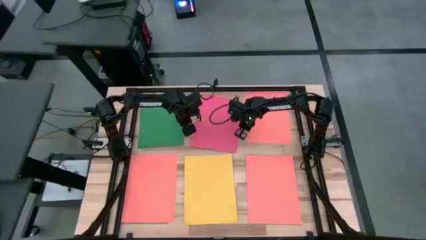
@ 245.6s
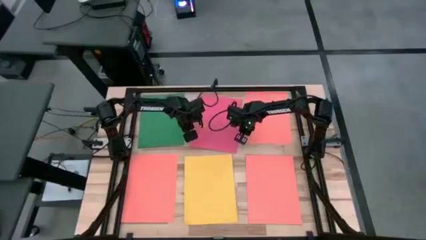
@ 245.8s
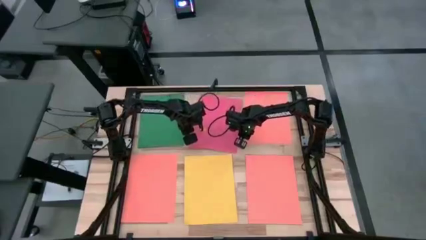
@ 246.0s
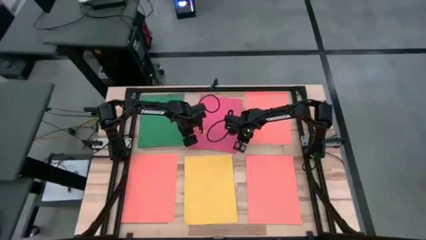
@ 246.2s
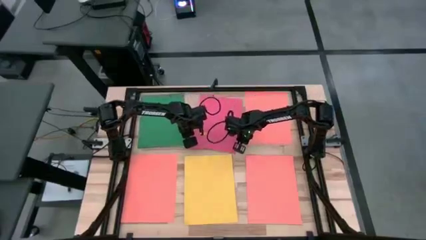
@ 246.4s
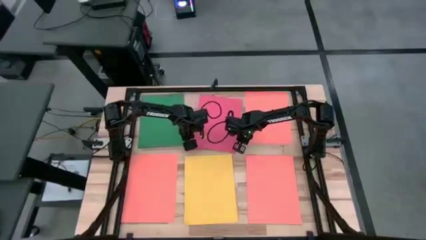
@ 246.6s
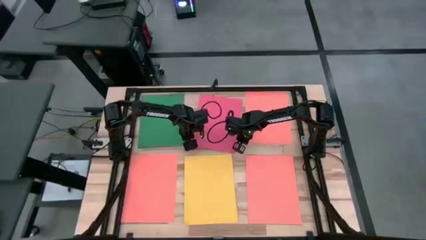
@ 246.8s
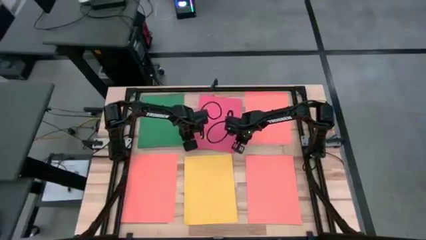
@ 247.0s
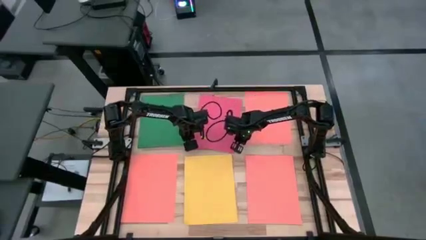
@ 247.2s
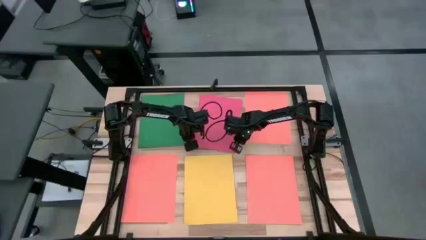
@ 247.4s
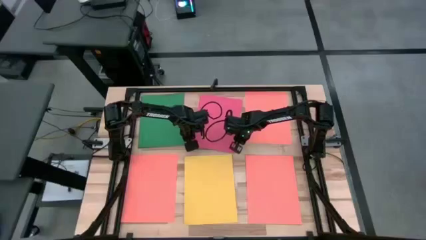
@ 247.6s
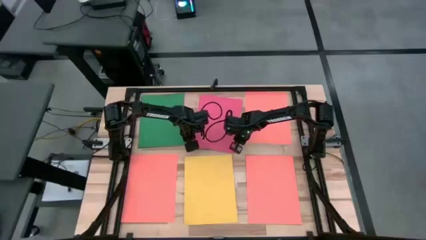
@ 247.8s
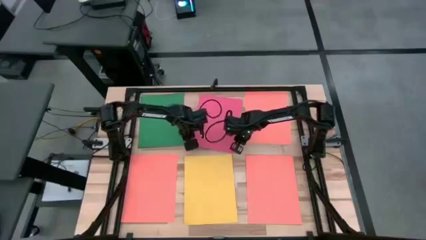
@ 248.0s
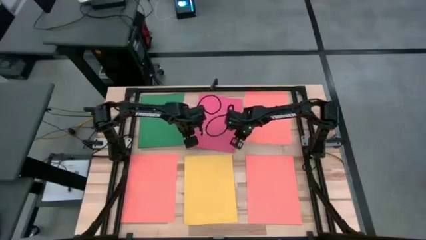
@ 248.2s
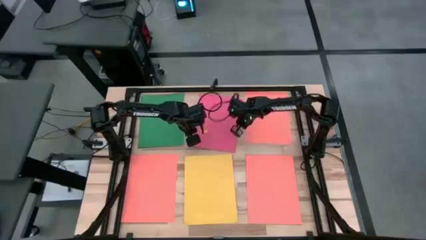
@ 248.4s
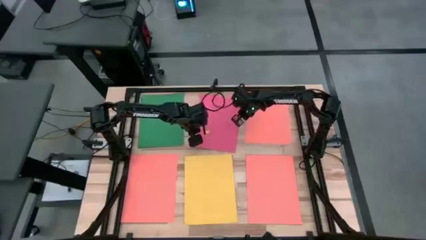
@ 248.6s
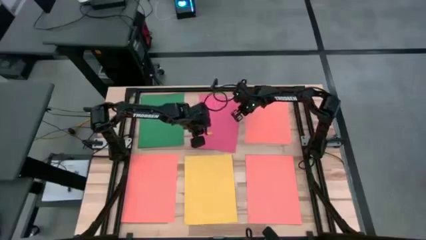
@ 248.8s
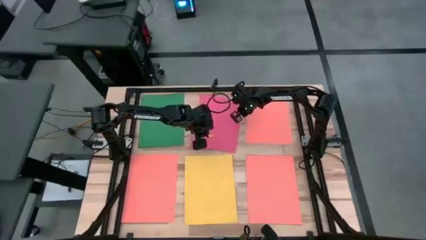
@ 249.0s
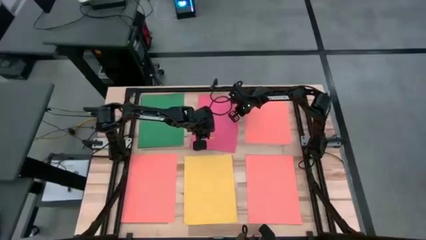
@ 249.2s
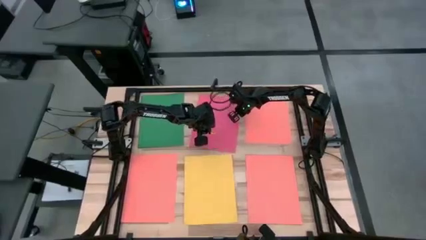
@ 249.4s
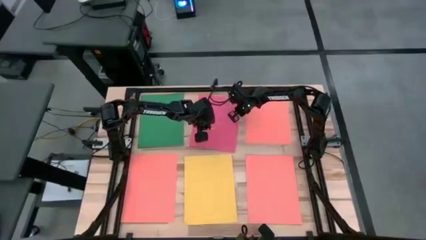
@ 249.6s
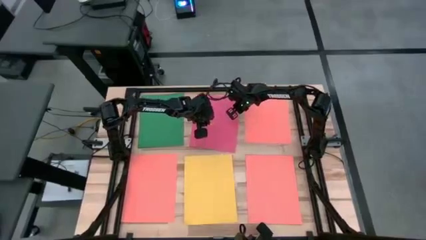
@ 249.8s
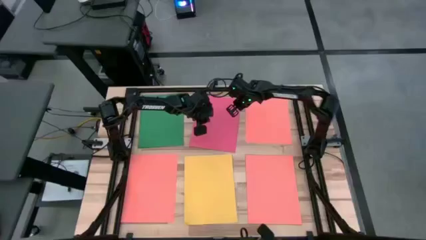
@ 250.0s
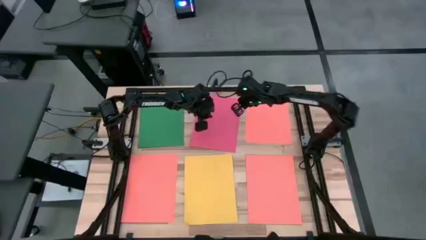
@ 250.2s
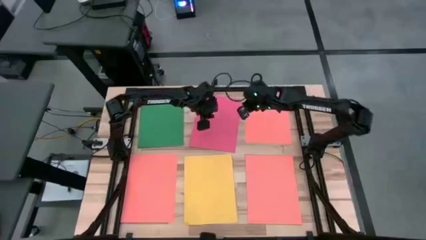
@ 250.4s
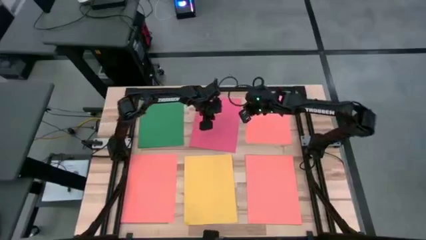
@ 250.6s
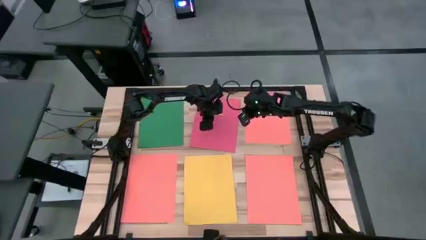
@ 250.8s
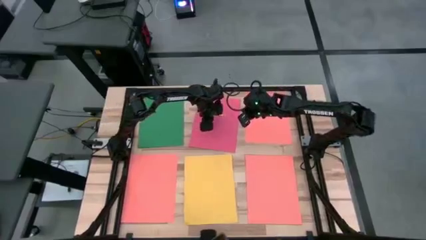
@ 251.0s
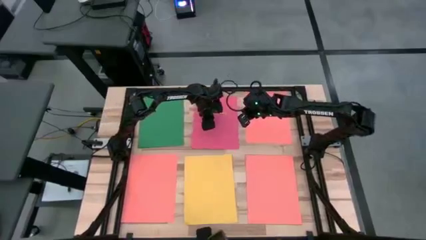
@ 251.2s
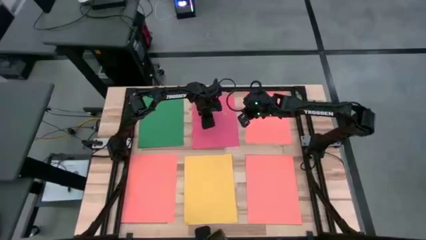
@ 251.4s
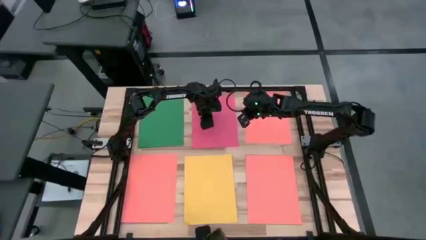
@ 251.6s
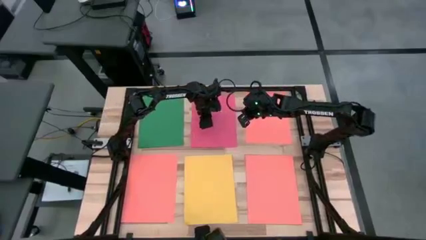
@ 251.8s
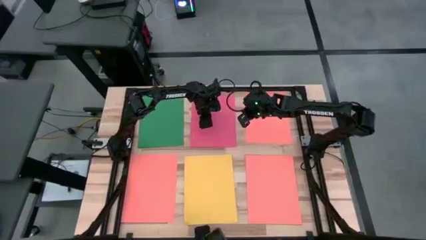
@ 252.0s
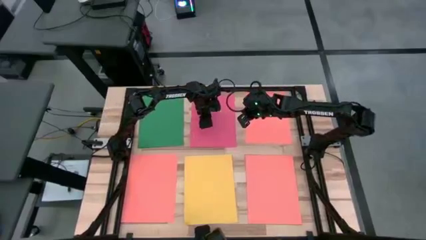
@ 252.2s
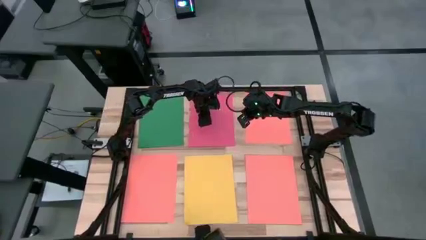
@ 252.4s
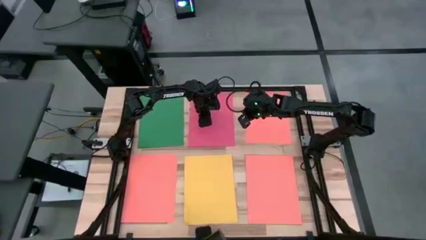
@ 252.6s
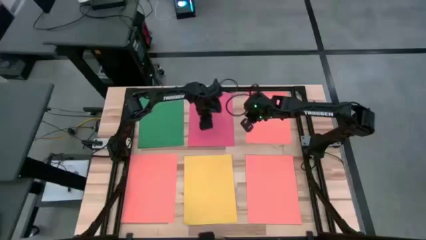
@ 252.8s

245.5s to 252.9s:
Task: Organize paper
Adjust the pink papers

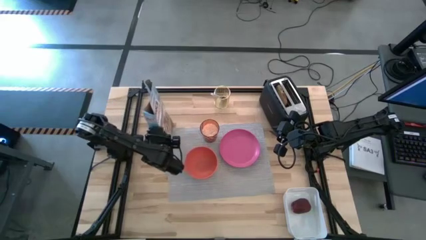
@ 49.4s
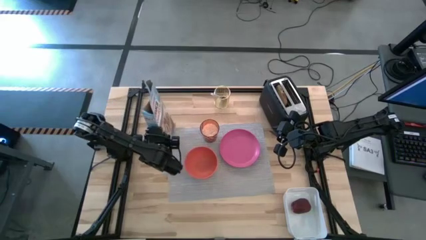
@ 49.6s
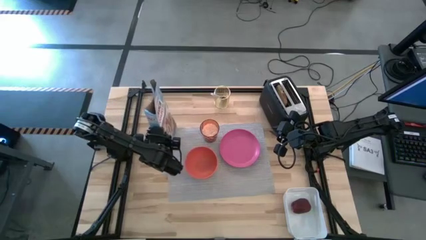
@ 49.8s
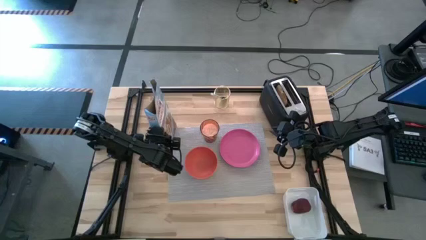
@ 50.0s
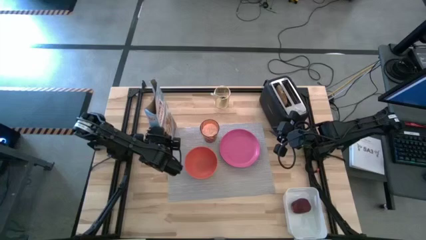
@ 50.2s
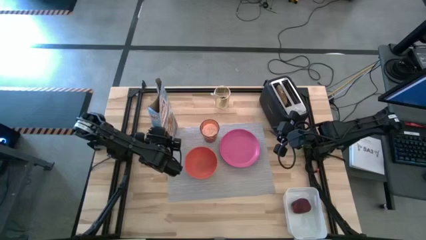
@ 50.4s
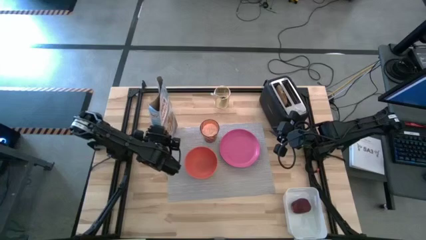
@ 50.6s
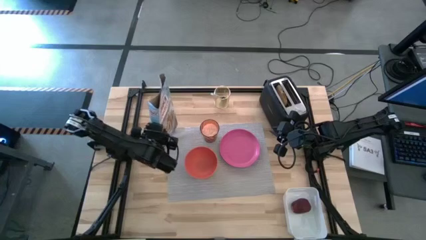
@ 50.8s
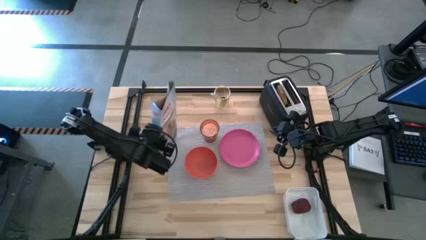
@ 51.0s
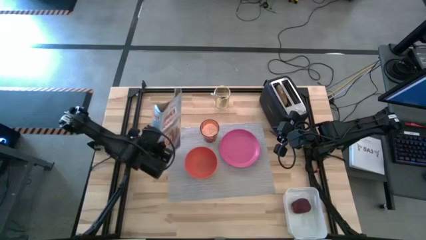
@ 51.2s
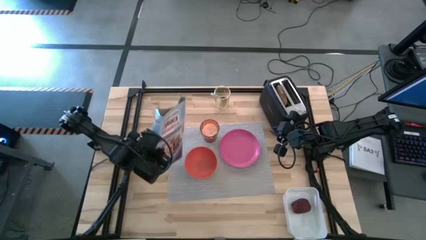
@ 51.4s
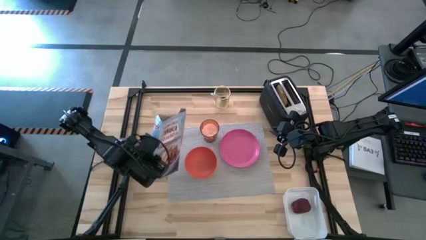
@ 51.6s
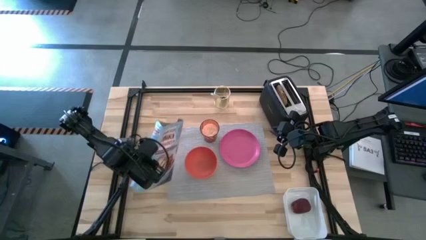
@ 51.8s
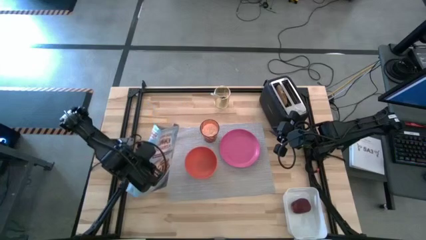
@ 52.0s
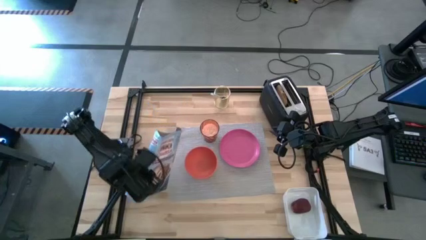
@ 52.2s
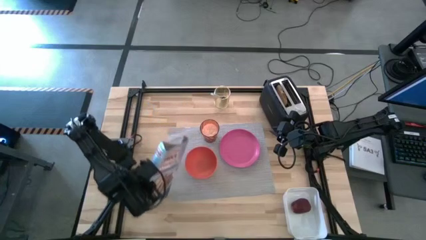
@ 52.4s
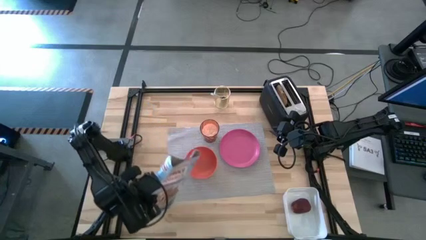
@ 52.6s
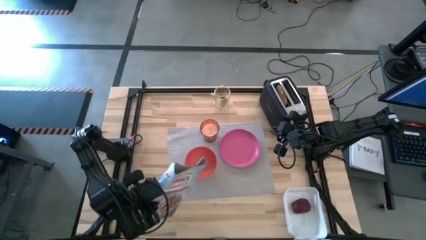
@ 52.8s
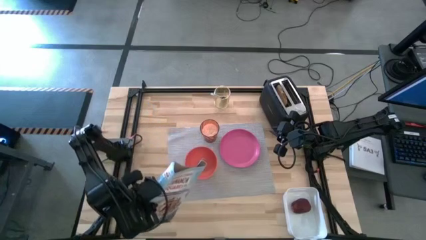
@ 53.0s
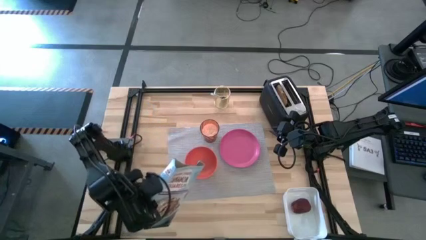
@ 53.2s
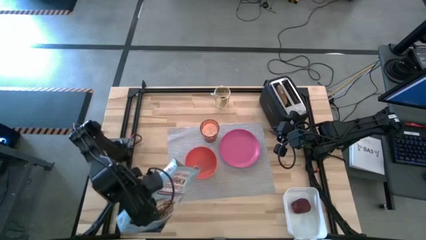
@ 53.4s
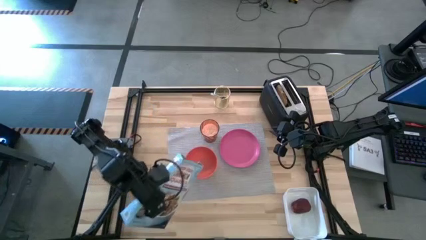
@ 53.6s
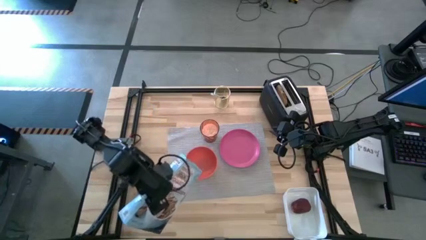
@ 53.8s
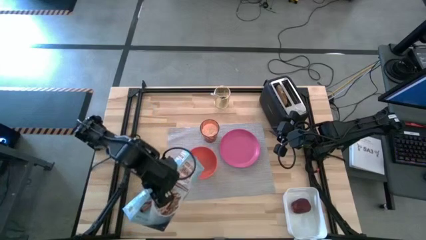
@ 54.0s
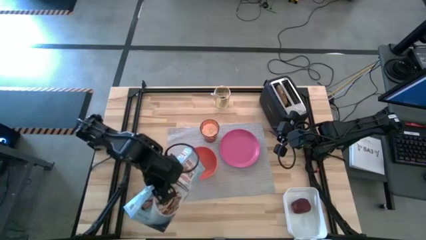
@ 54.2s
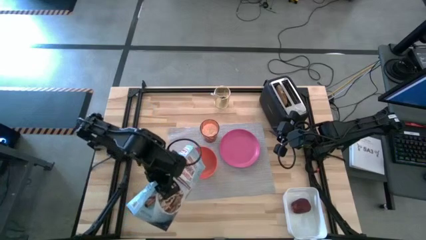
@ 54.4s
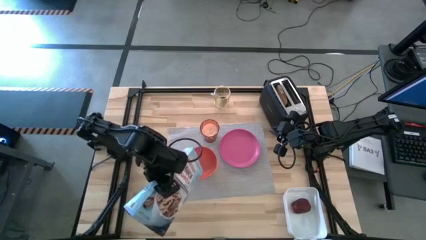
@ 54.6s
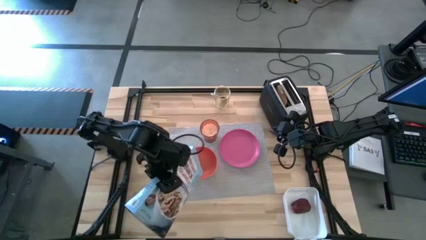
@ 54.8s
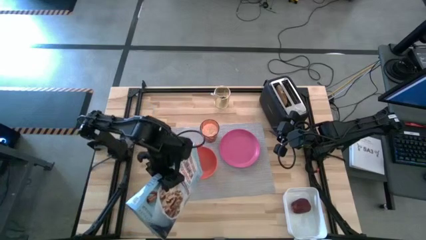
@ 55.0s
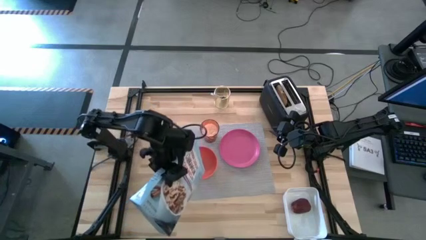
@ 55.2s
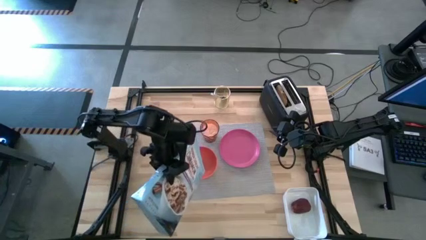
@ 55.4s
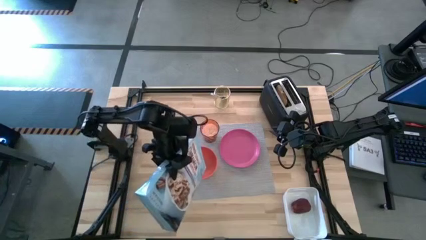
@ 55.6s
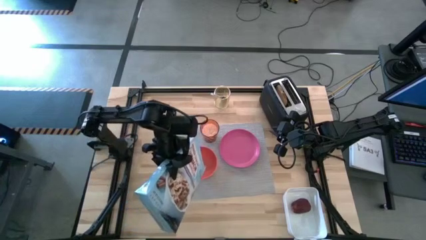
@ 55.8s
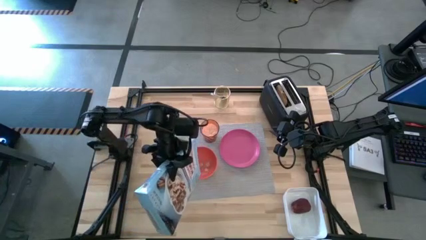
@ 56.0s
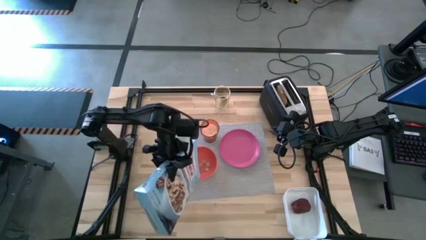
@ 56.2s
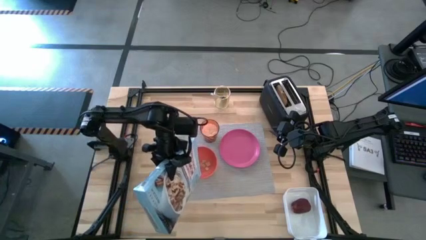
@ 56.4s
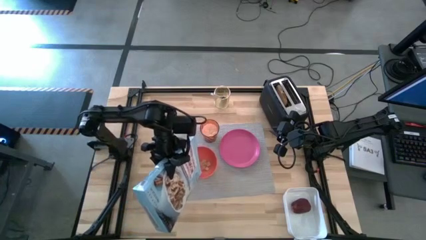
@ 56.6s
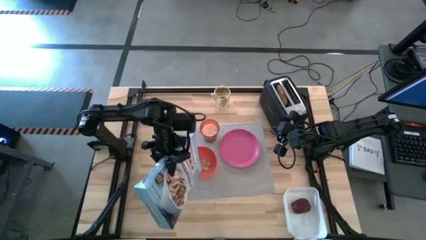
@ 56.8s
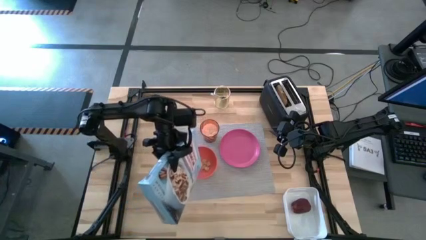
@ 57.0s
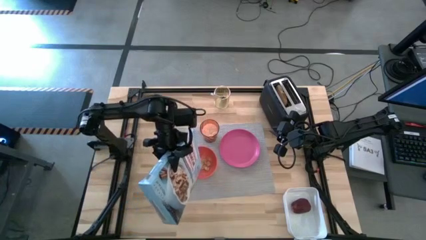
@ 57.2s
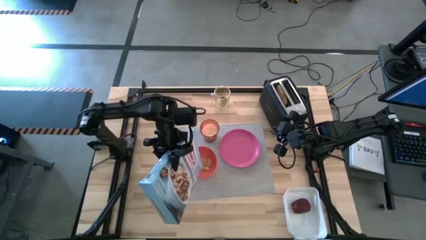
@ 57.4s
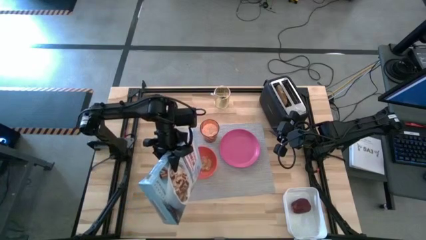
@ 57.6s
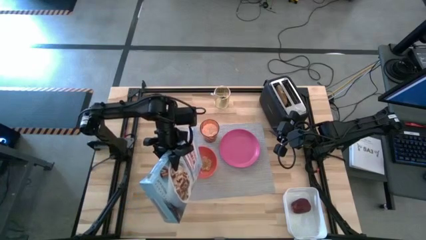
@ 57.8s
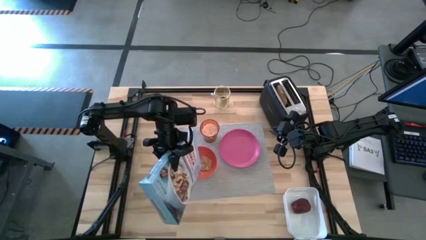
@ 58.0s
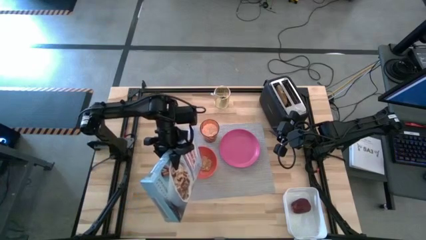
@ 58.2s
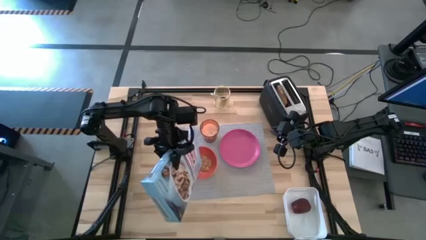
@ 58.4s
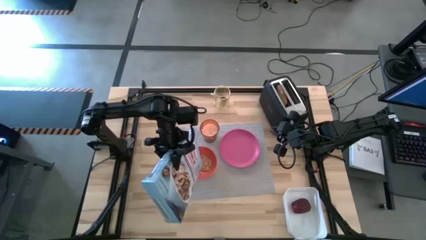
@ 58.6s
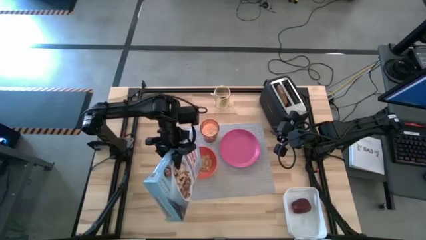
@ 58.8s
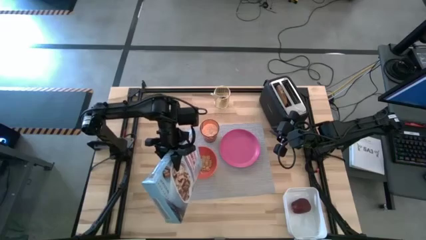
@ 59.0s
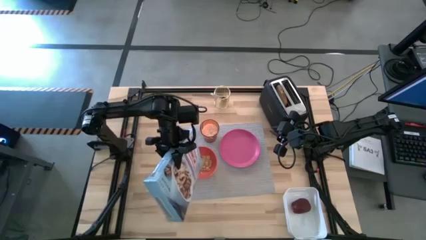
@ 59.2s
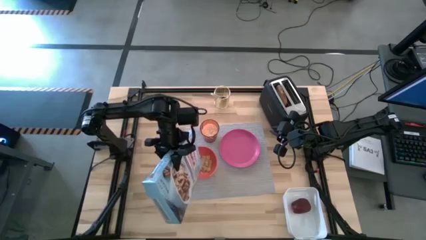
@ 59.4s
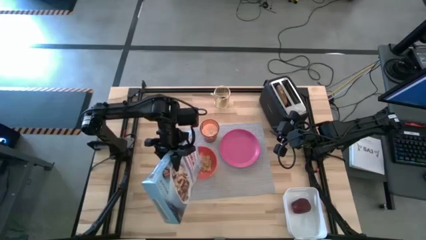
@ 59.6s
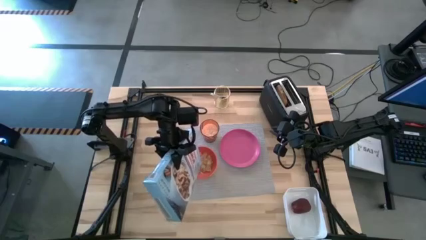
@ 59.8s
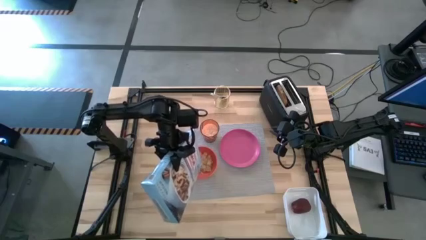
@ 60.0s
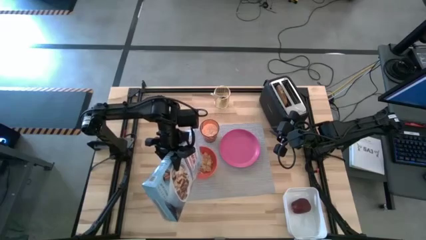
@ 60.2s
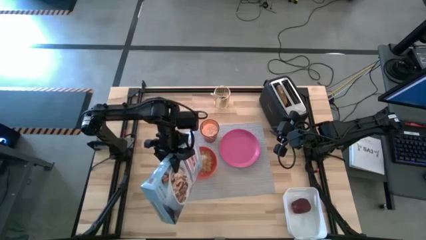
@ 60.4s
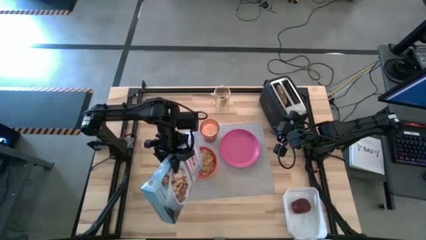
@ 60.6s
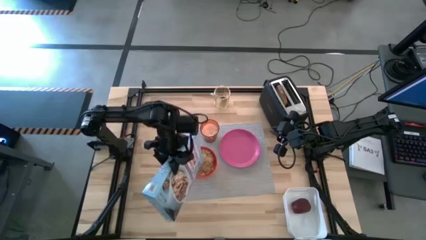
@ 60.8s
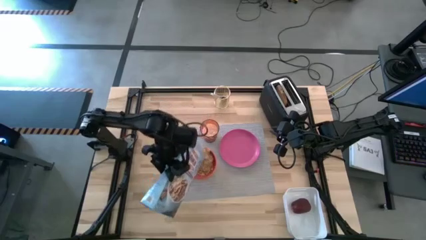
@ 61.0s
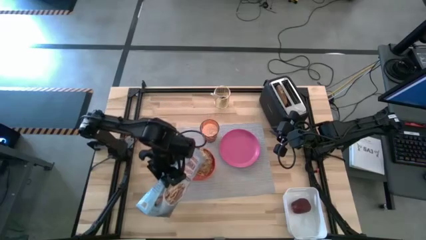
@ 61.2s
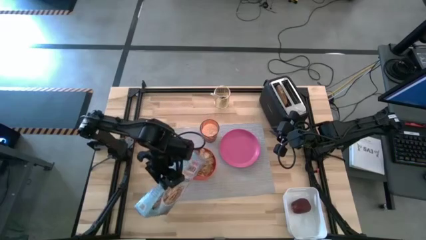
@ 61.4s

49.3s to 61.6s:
Task: Arrange a breakfast setting
Pour the cereal from the blue cereal box into the orange bowl
